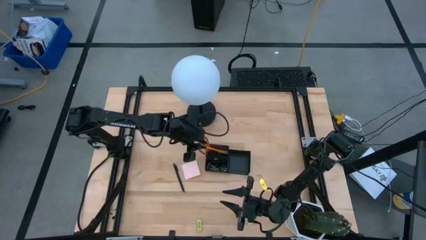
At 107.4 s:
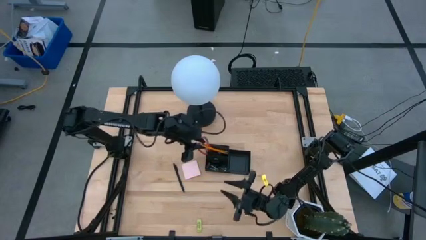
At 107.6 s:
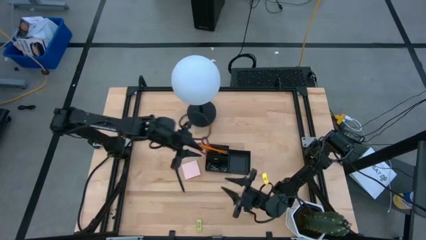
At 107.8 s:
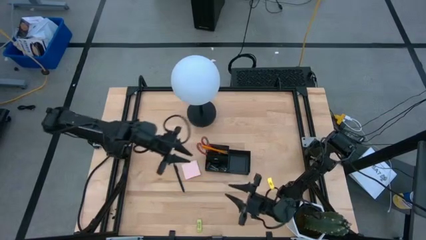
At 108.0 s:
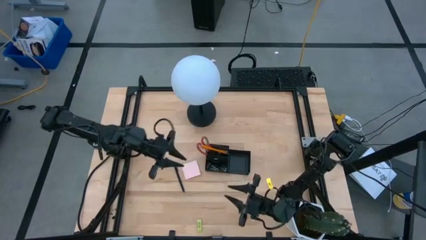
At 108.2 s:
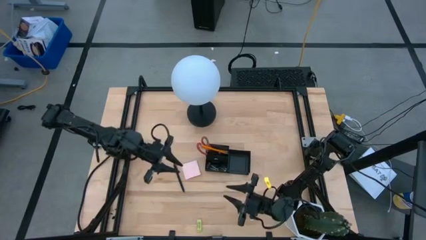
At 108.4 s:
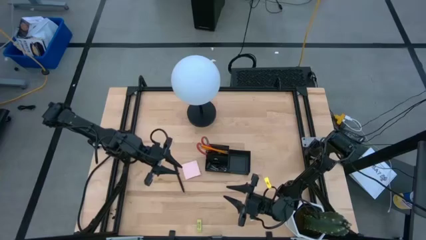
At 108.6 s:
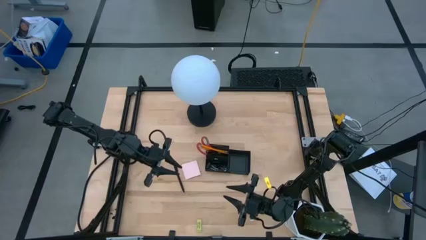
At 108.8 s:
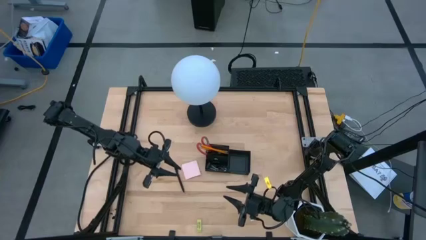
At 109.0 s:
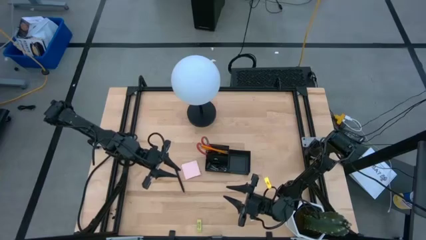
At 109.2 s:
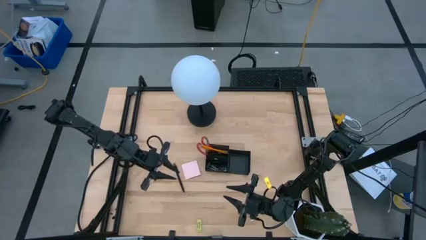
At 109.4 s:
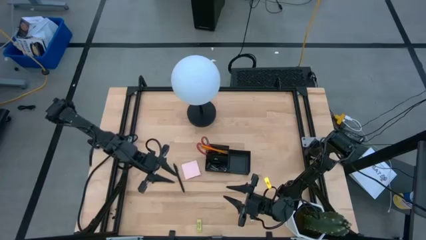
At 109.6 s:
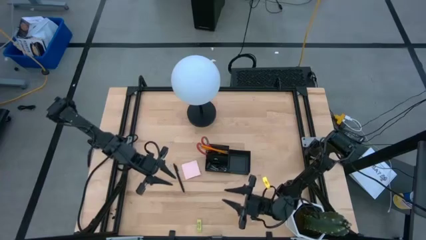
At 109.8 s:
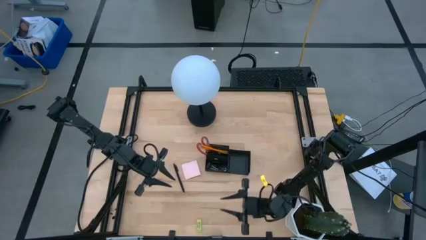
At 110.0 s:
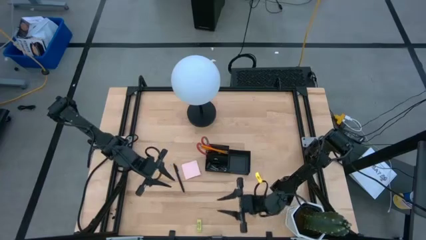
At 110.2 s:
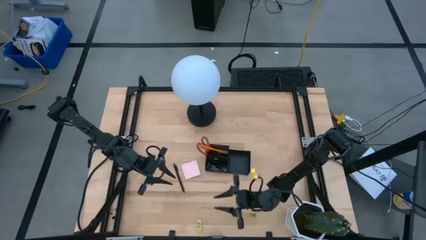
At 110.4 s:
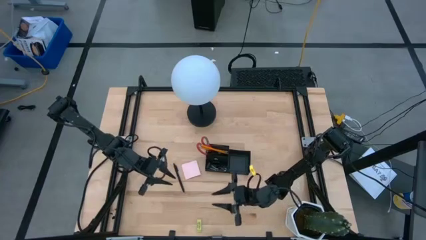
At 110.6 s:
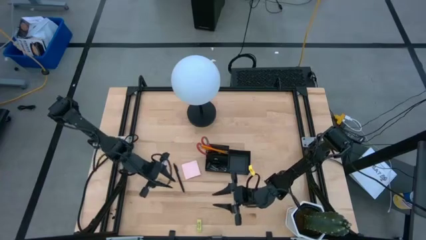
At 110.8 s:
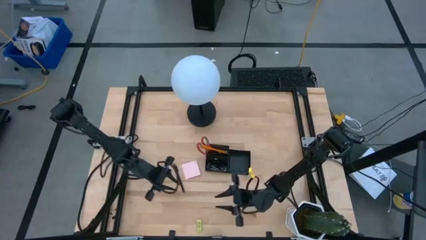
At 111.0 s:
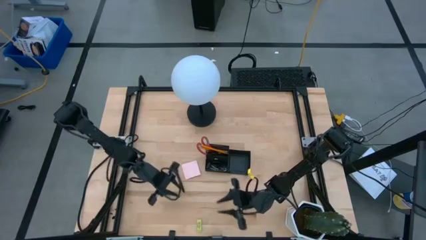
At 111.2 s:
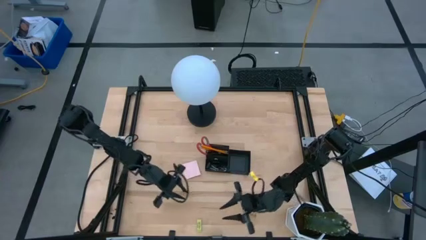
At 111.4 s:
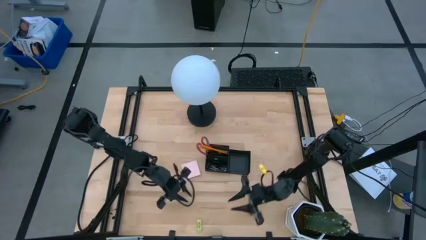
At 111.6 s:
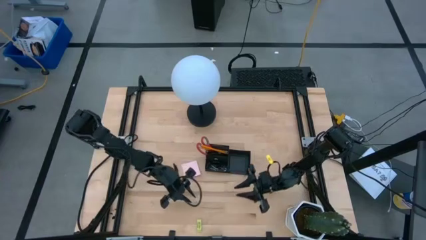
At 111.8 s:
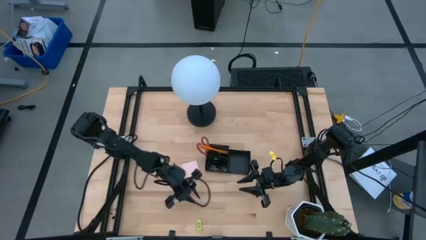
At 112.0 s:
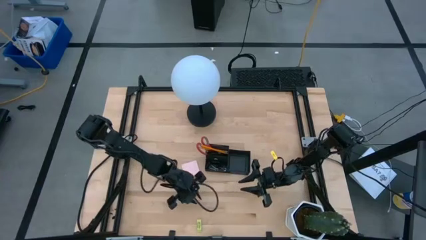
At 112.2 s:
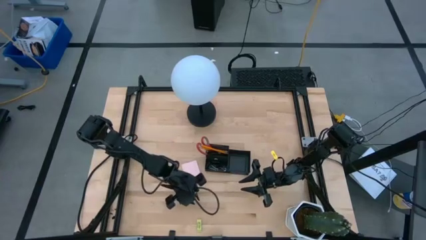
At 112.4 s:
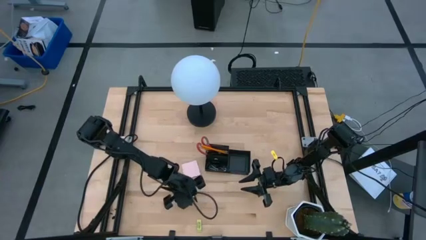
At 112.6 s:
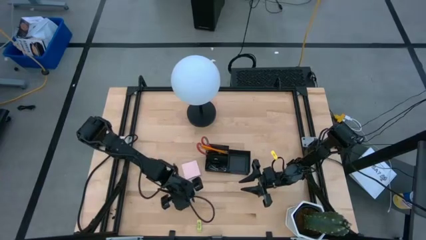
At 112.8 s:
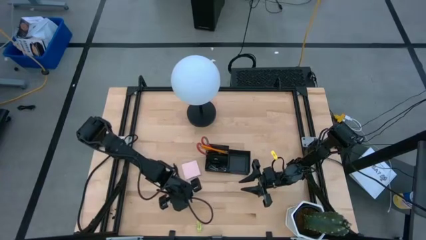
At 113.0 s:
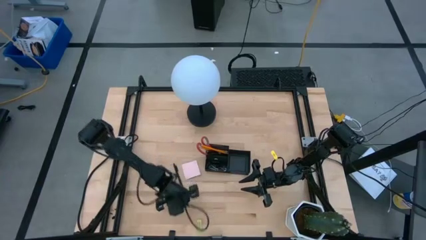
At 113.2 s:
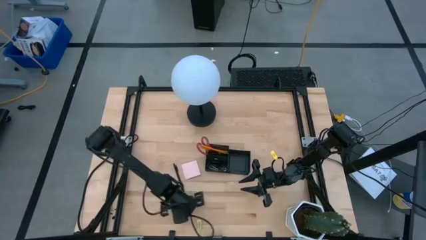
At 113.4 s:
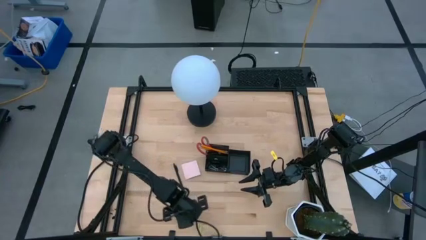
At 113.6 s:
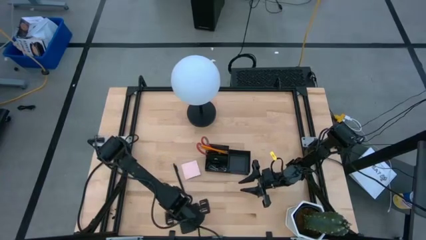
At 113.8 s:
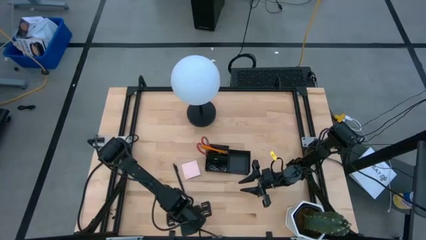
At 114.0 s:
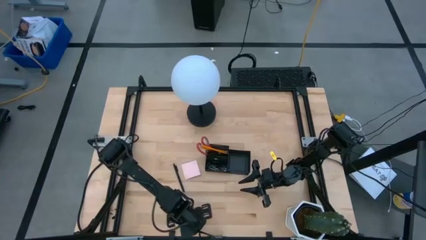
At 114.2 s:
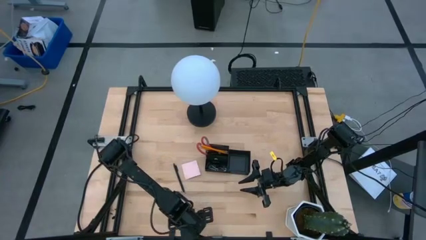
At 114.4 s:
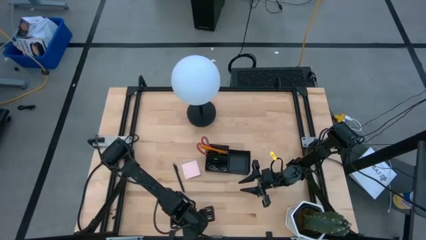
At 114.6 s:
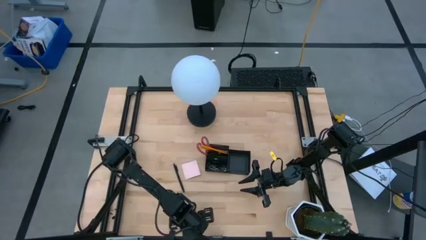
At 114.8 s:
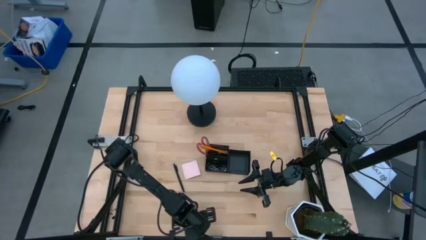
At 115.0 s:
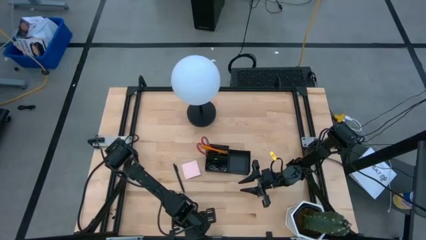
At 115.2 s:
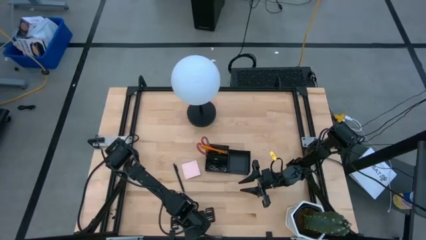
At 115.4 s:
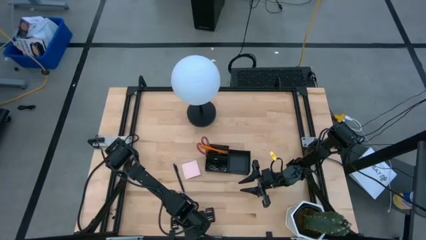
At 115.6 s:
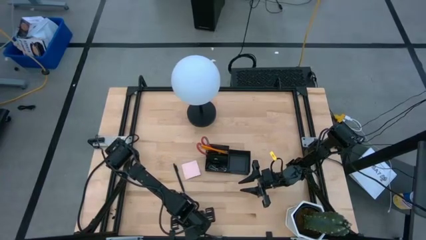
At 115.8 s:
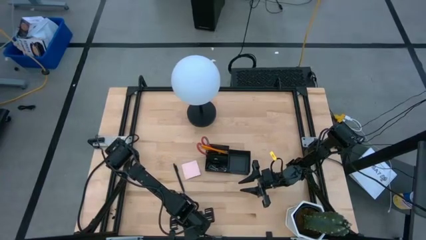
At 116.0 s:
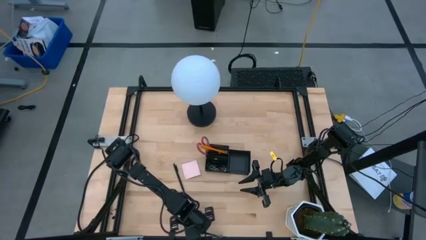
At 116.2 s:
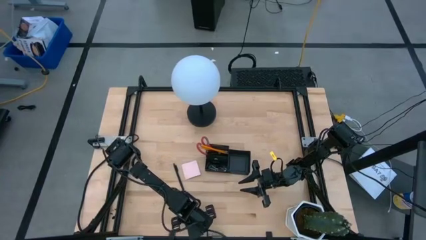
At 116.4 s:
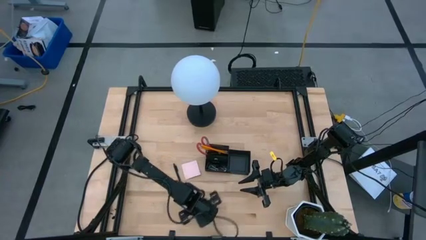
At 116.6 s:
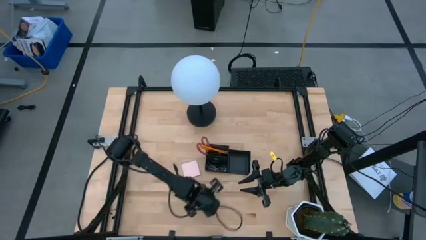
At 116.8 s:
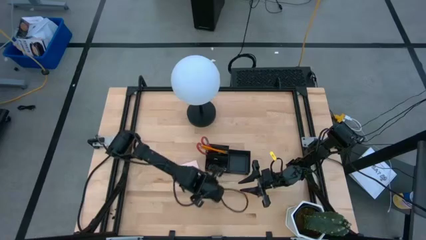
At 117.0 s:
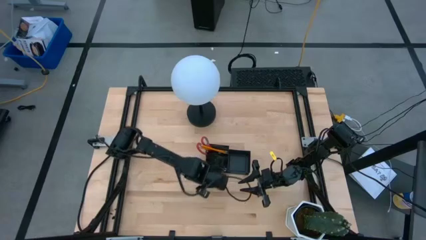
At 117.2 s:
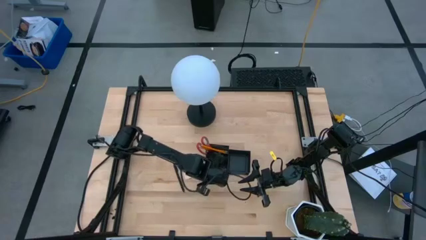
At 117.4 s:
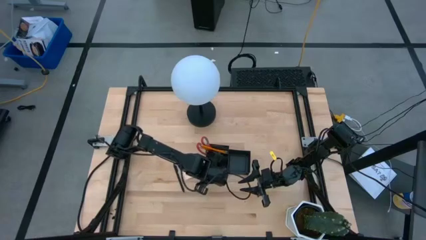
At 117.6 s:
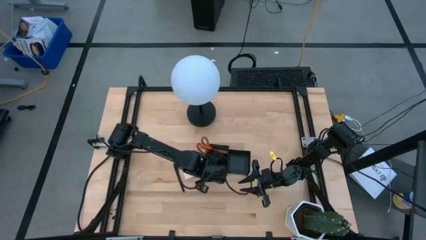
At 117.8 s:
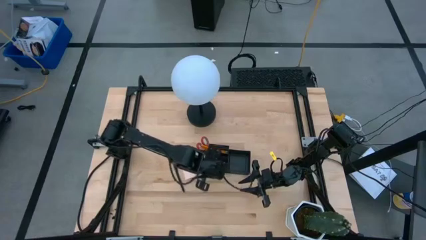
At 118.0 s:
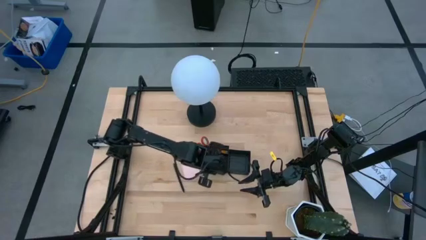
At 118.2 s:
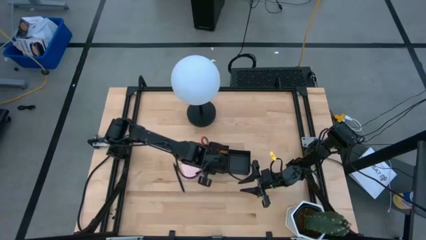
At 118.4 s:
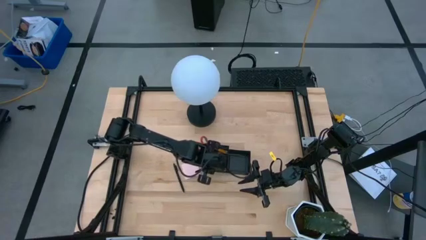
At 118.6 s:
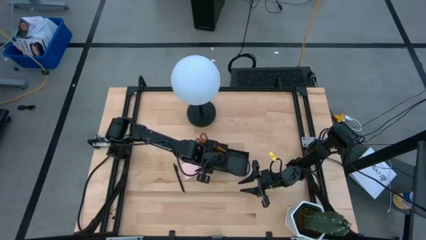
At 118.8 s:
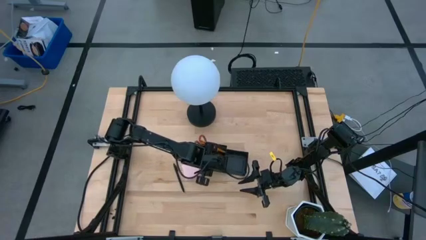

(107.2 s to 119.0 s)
Task: Pick and place office supplies into organizer
Put the eraser into the desk organizer

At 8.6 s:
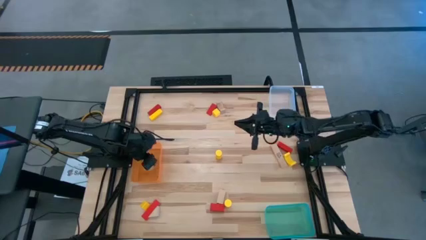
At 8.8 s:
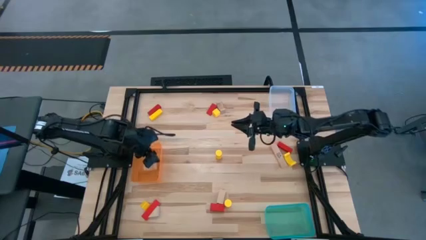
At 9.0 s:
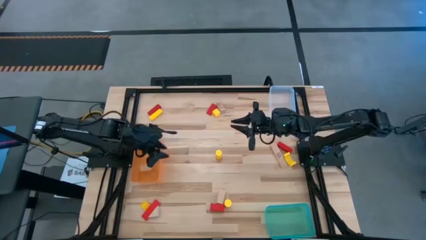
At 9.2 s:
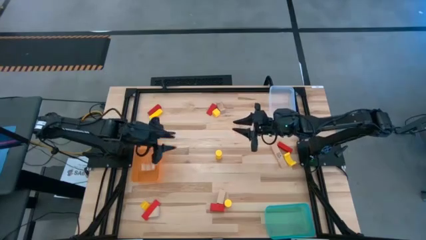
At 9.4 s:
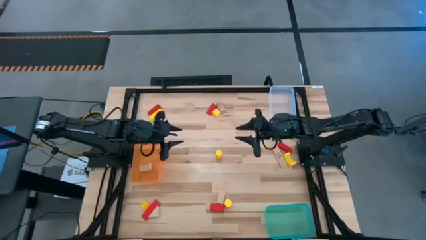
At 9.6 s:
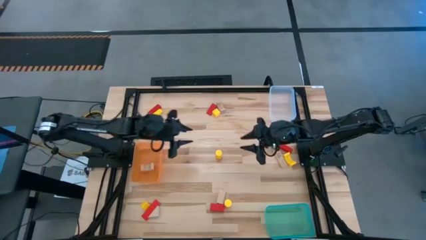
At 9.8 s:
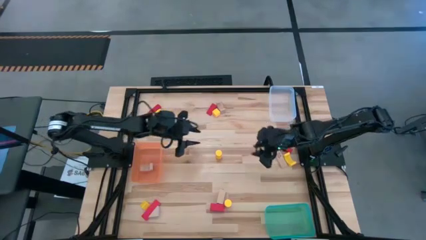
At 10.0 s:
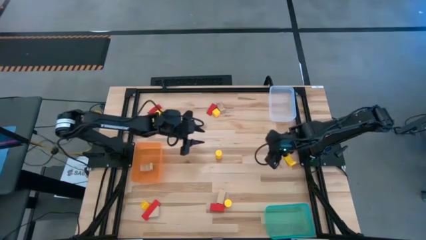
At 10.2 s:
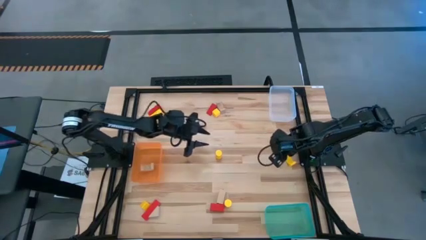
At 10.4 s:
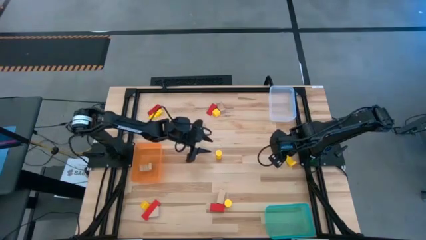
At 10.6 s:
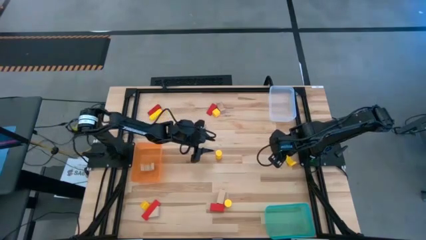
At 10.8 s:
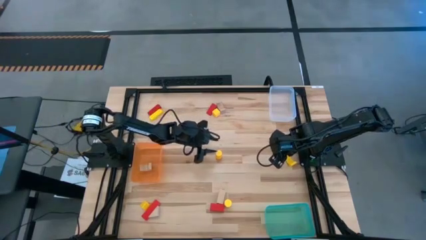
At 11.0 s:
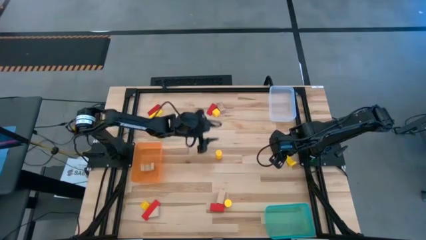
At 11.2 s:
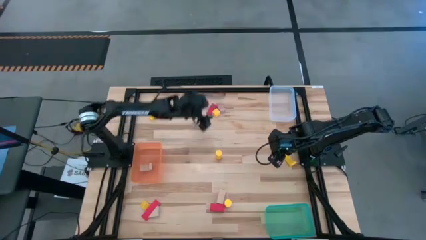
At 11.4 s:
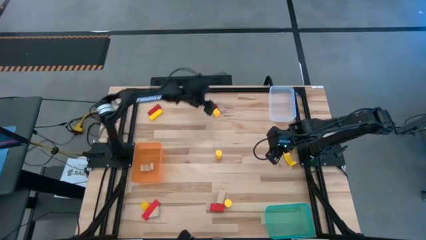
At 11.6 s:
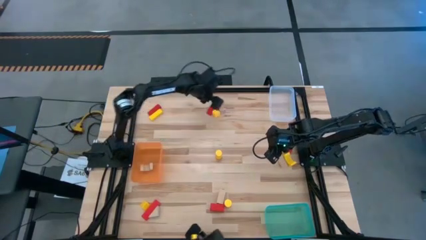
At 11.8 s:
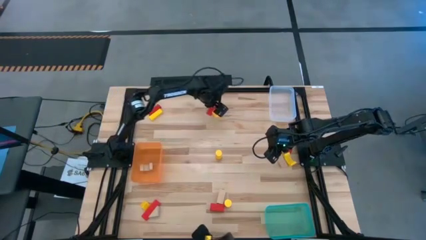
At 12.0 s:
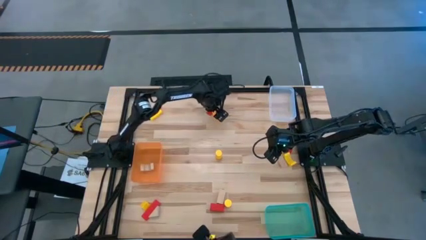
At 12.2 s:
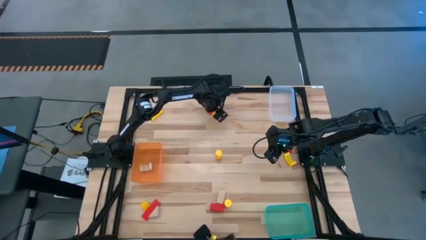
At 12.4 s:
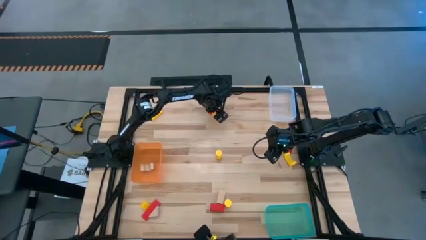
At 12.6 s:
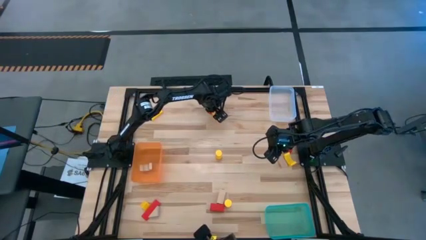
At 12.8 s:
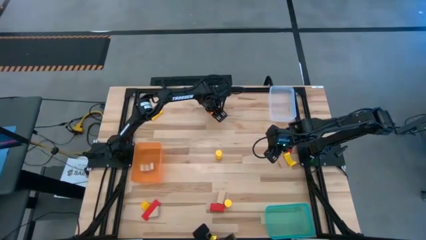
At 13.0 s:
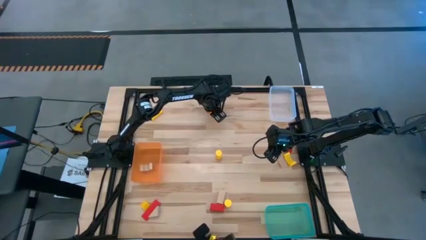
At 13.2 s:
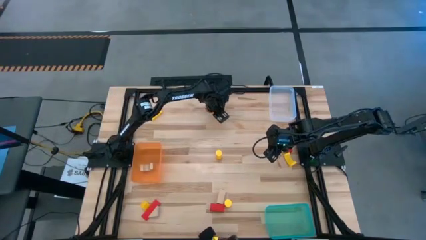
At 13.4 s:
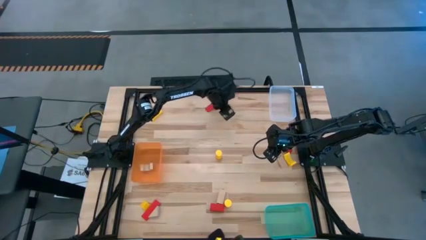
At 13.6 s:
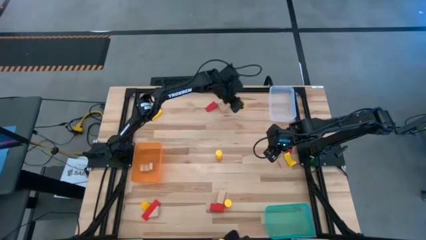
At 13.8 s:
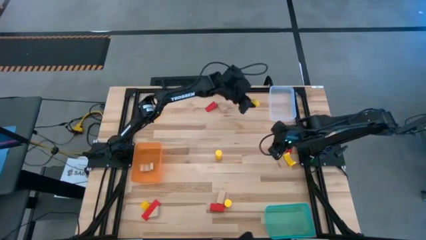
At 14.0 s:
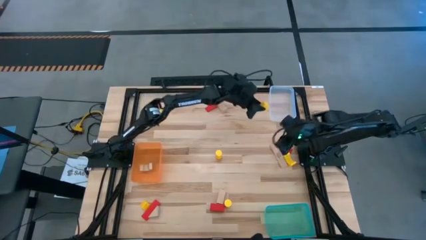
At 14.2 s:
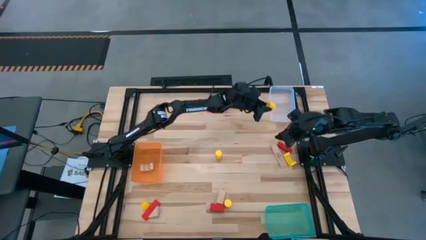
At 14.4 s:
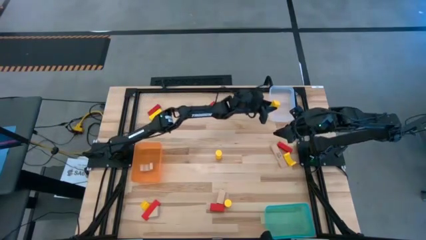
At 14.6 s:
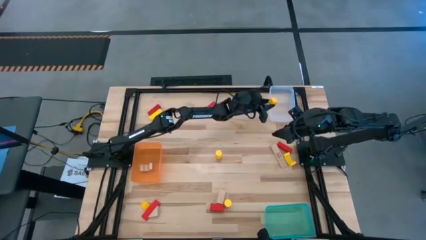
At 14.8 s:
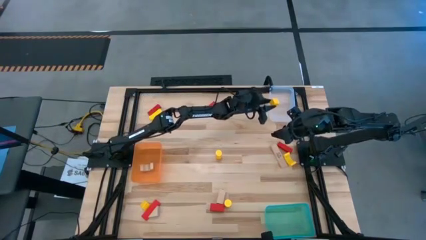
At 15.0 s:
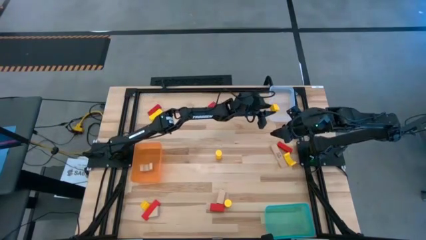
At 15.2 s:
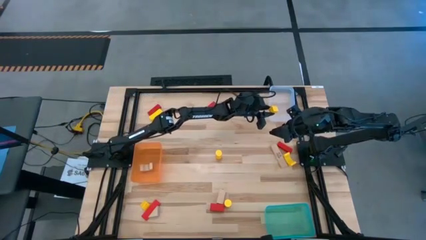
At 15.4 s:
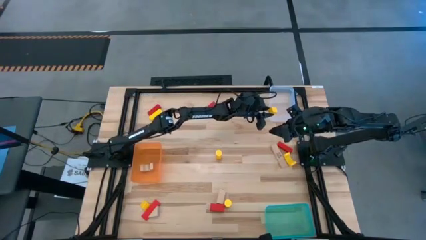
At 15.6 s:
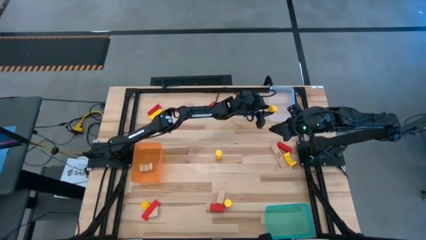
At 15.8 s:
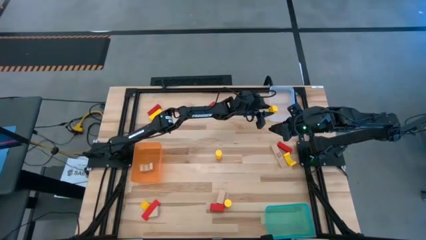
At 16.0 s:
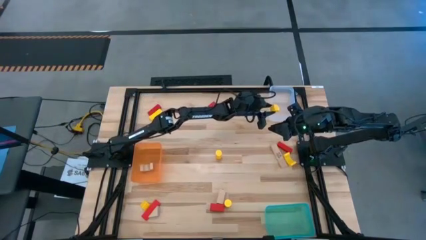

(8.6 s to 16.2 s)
Task: Sort & place blocks by color
Put the yellow block into the transparent bin
